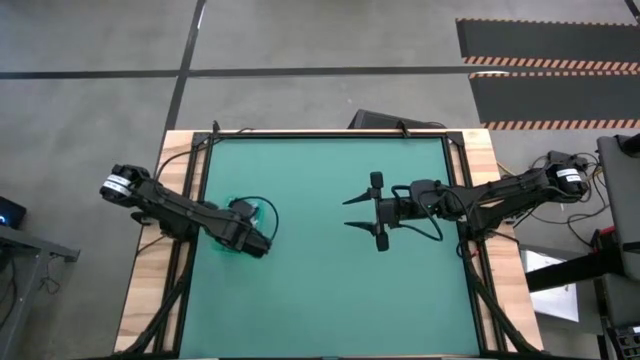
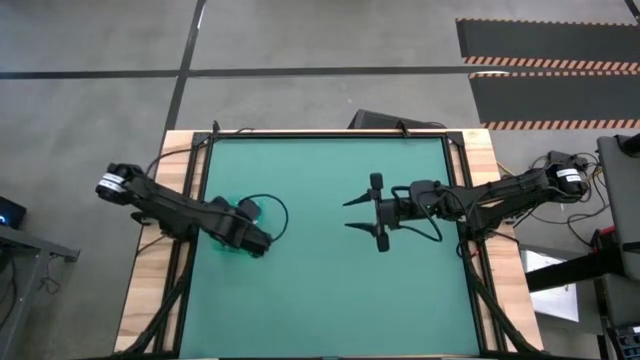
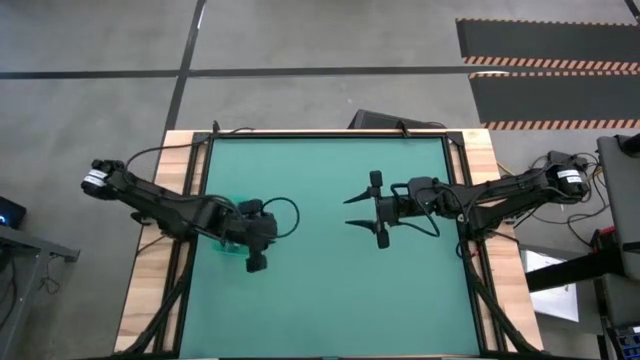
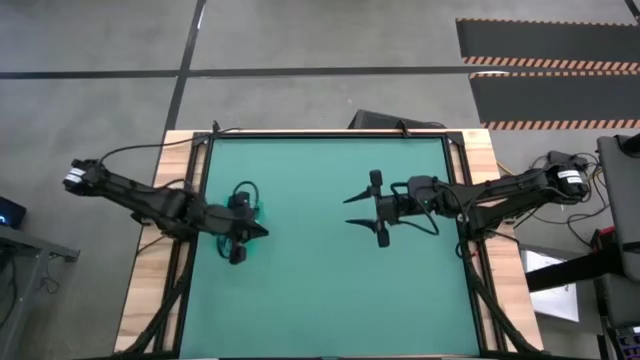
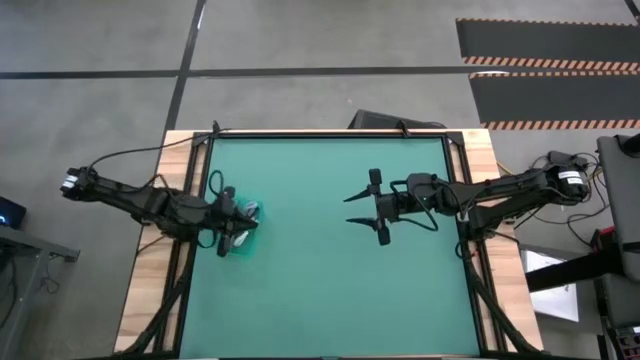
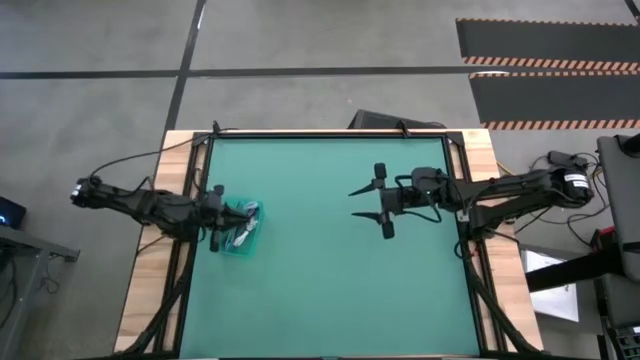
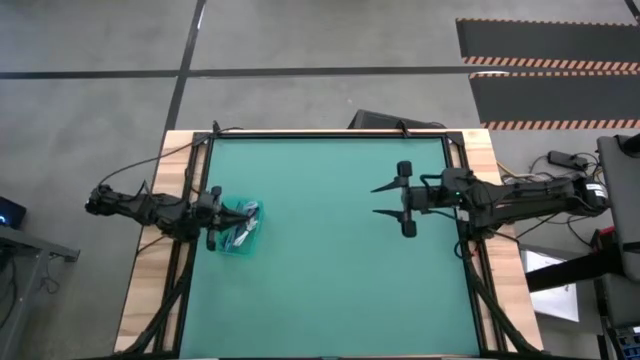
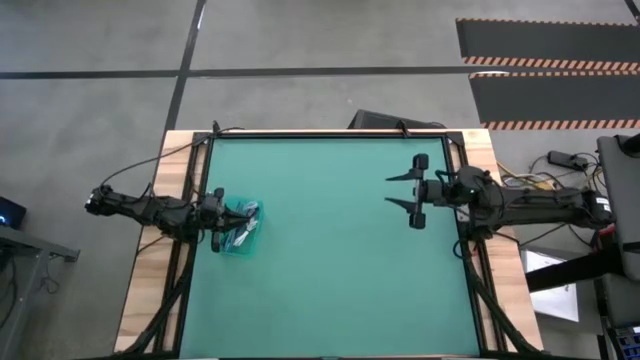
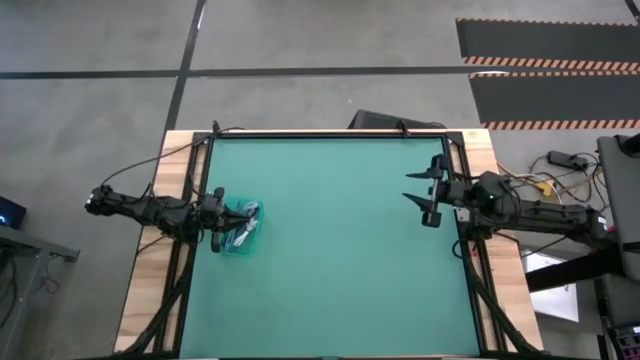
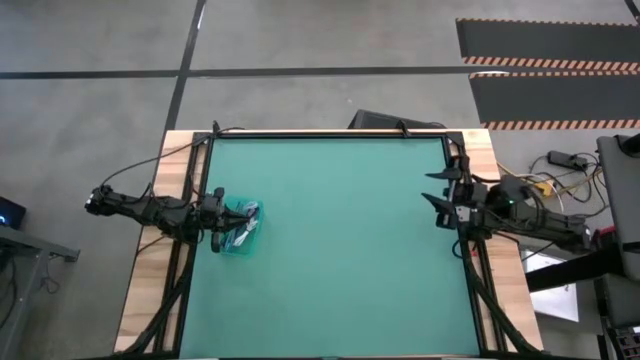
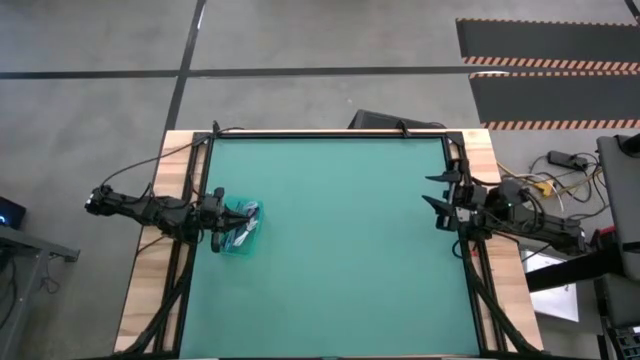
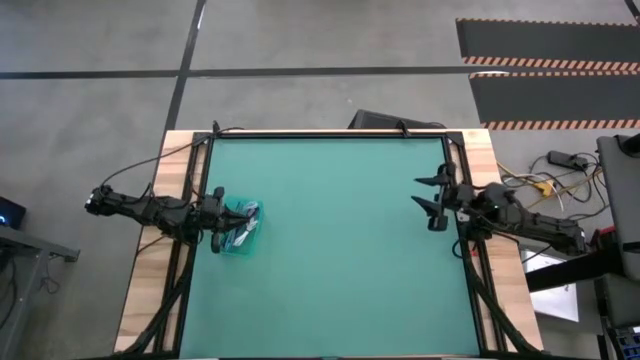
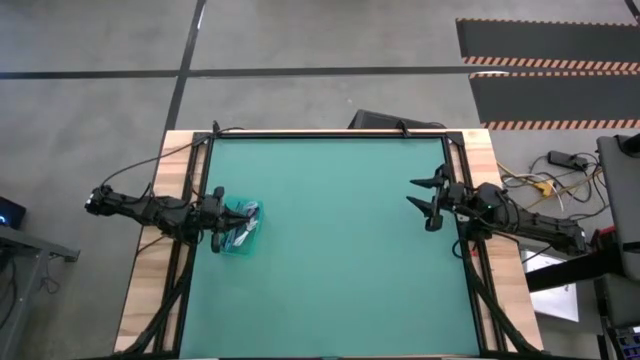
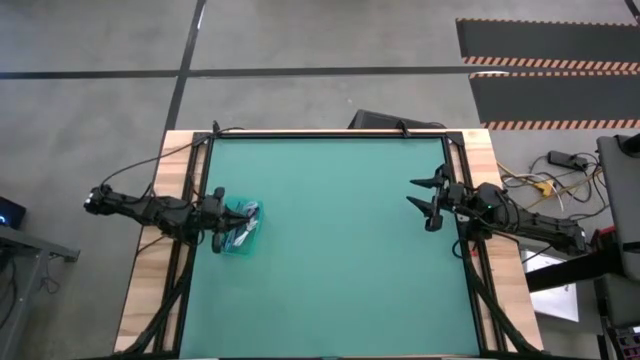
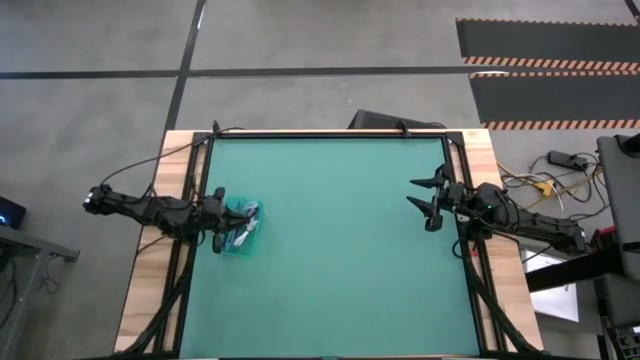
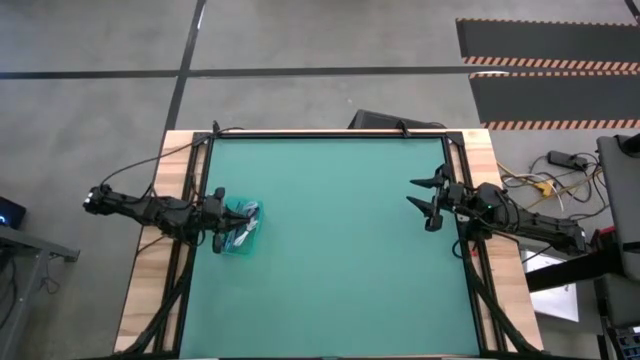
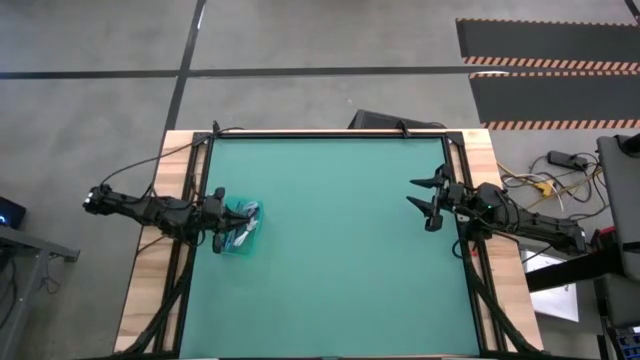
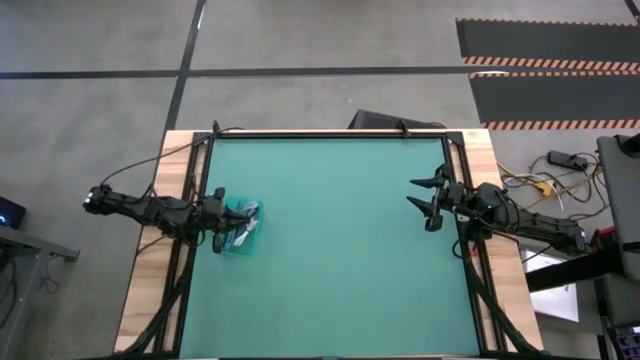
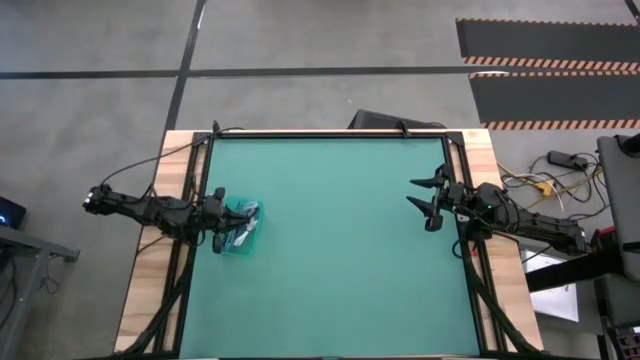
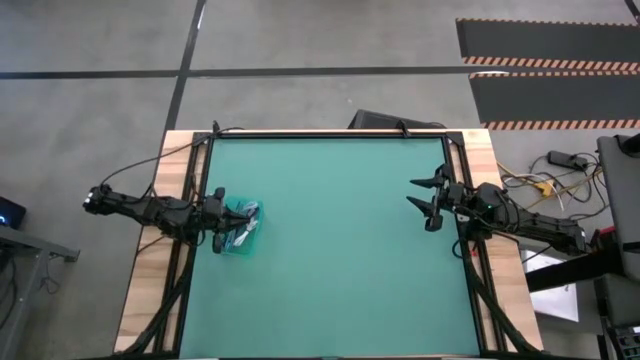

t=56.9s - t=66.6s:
Task: Pick and place USB-C Cables
Return to Home Position

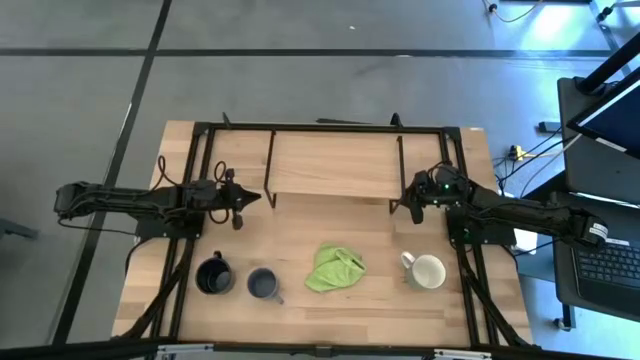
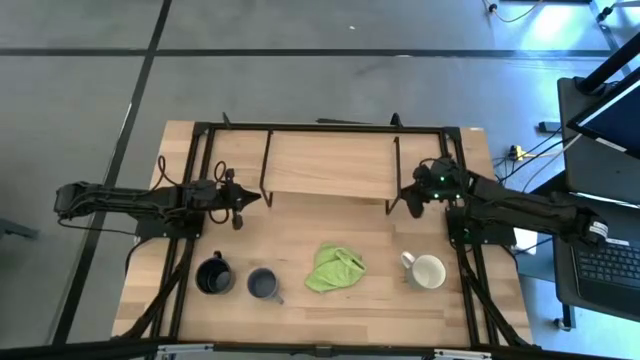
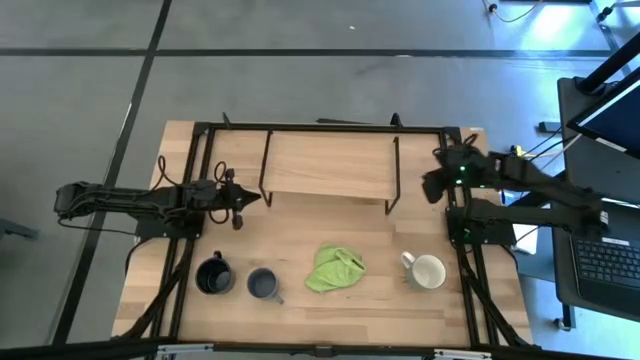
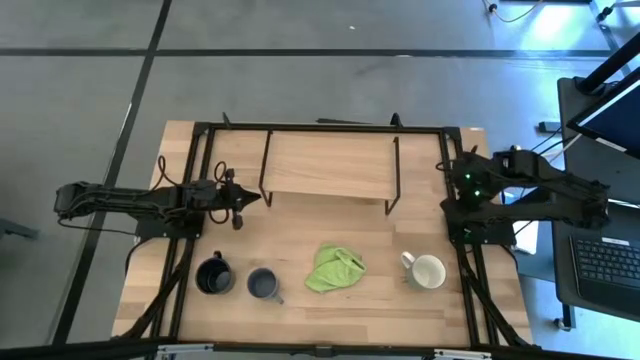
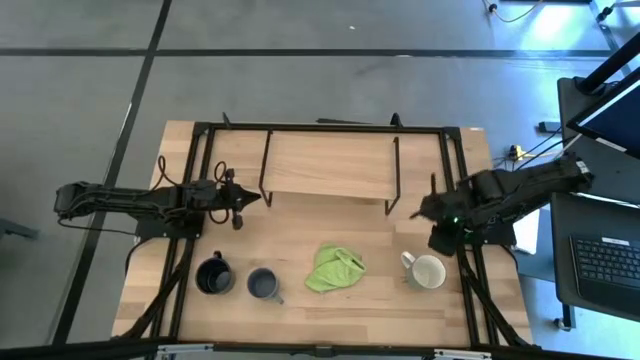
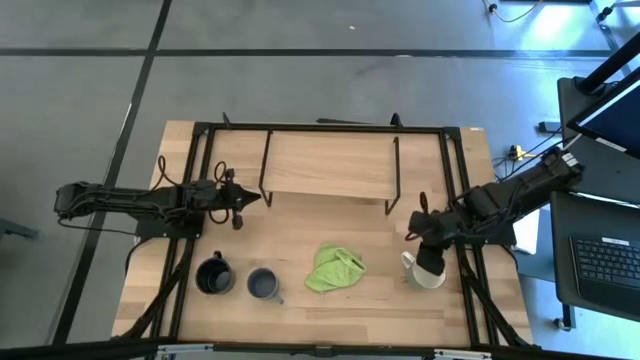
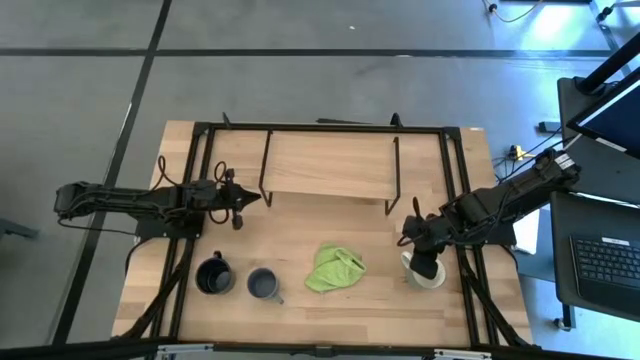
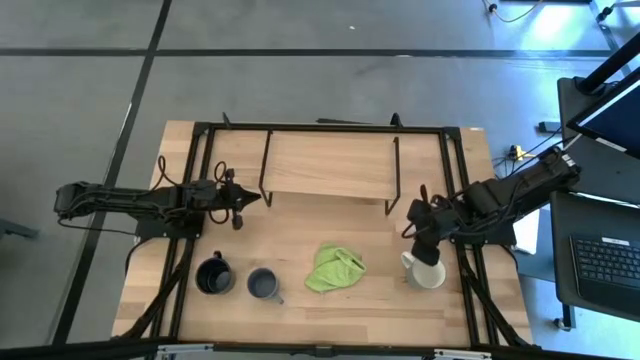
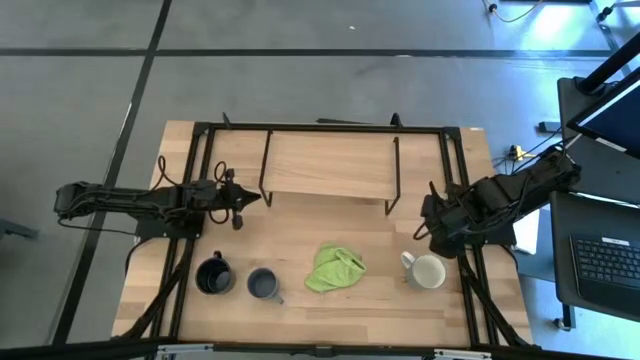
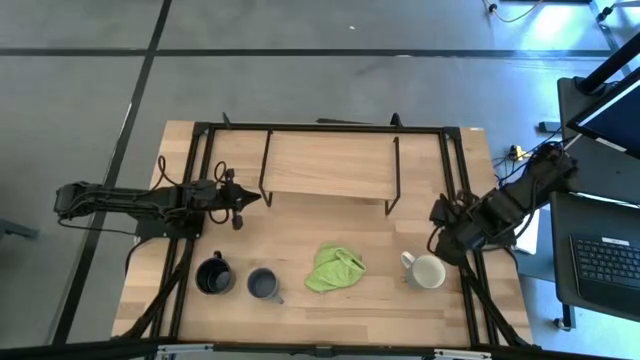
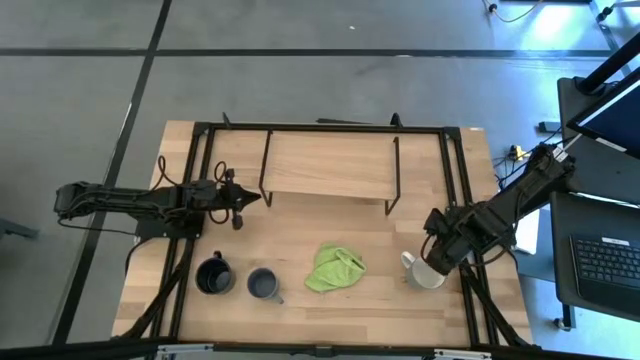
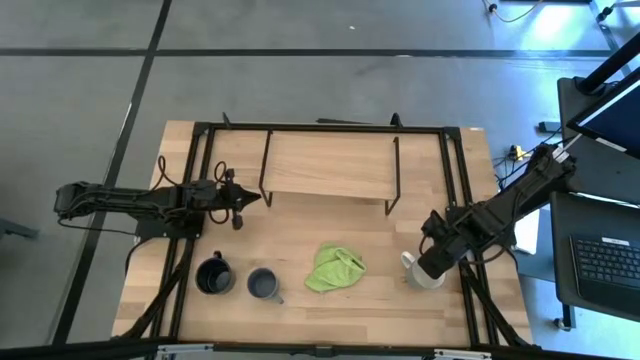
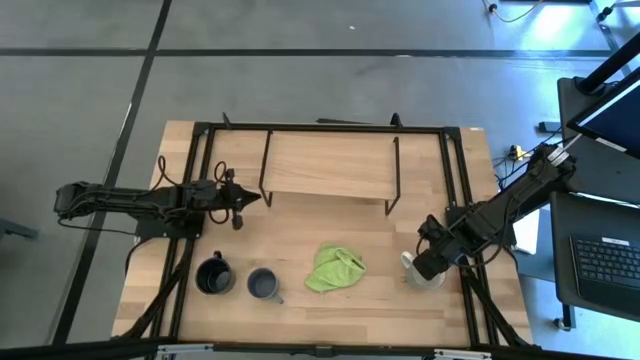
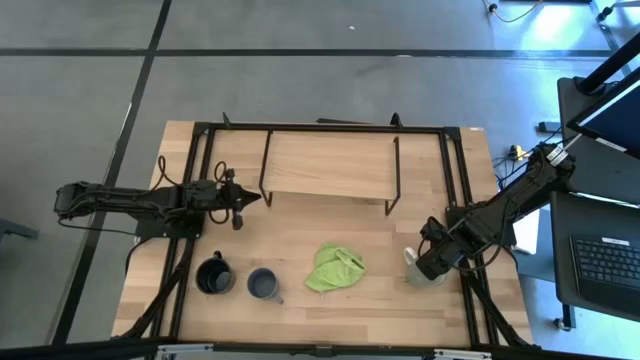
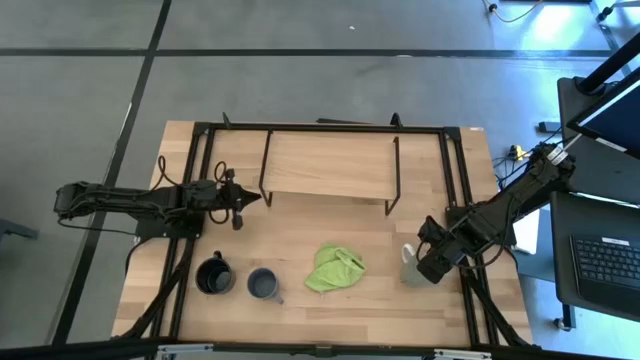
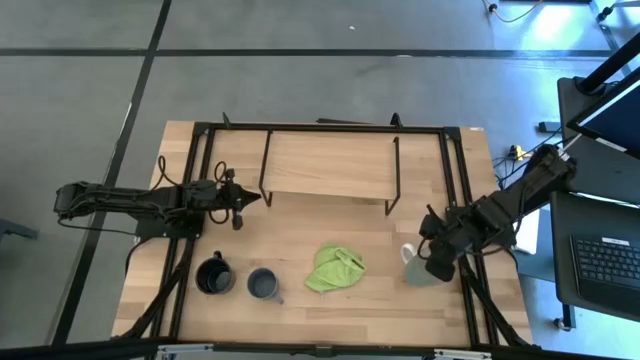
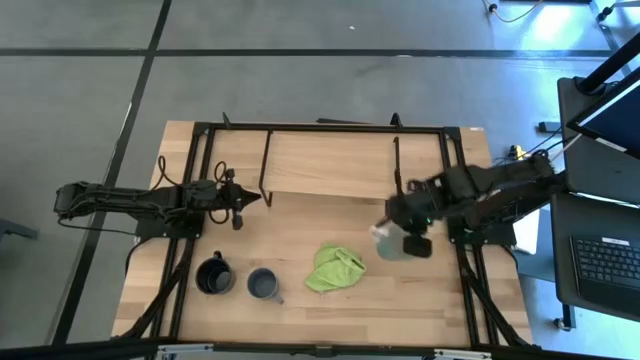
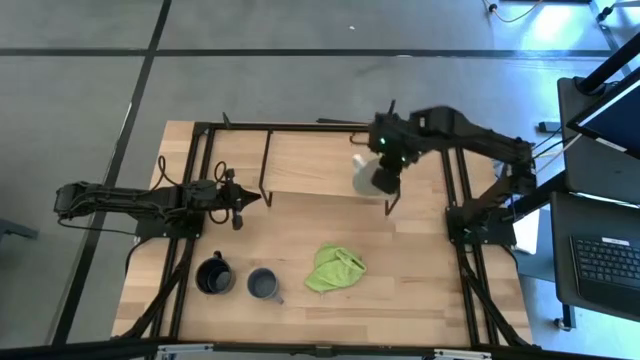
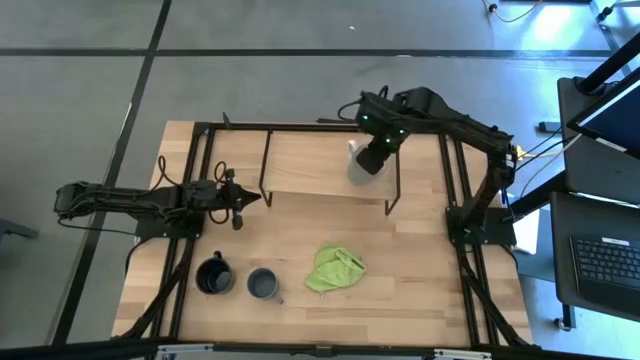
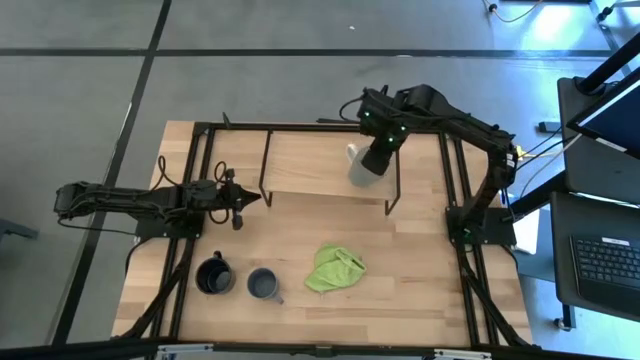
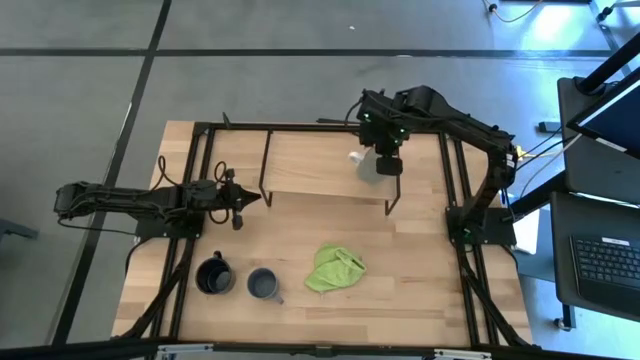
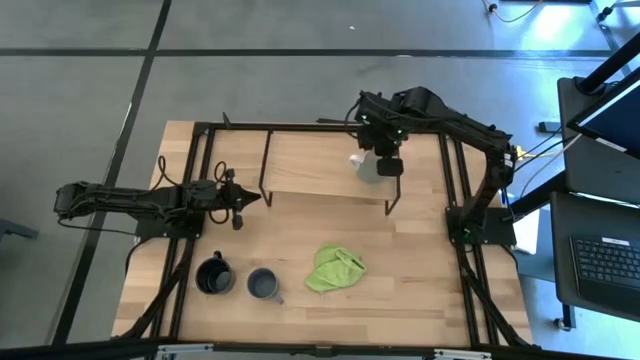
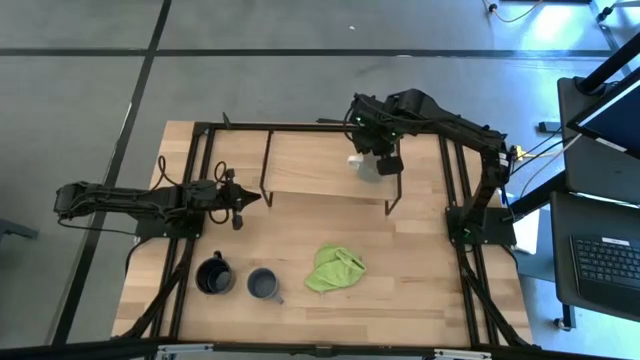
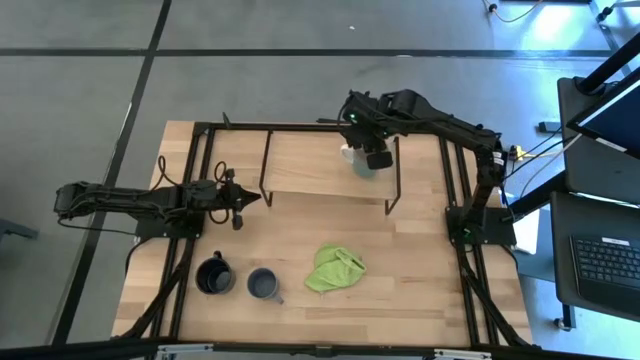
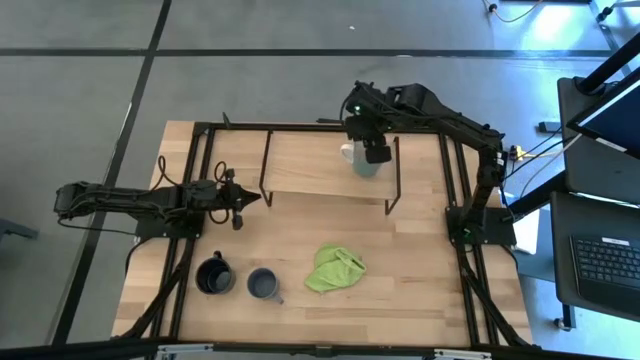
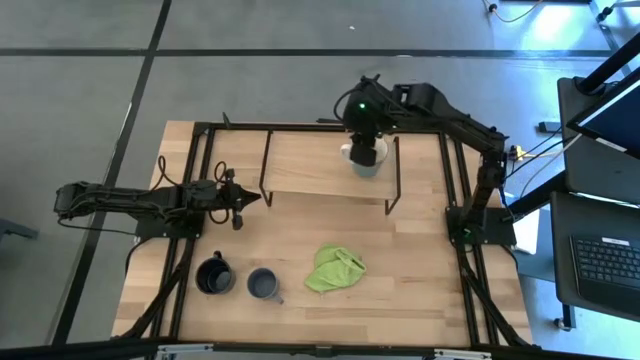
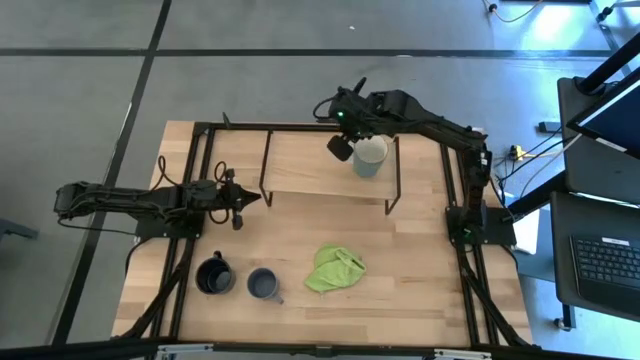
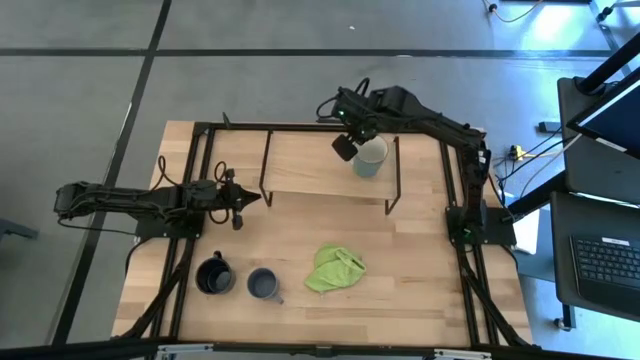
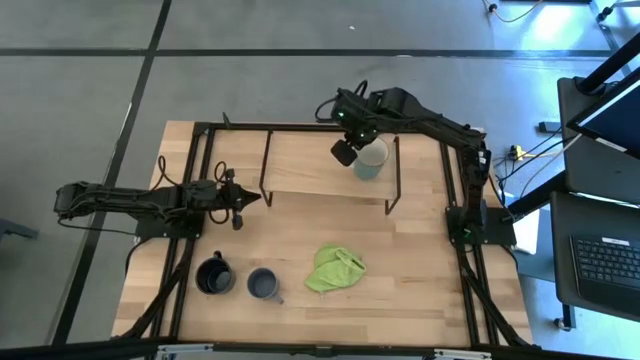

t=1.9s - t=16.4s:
Task: Stack small to large cups/mugs on shelf
Put the light blue mug on the shelf
